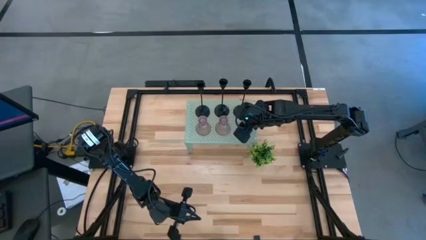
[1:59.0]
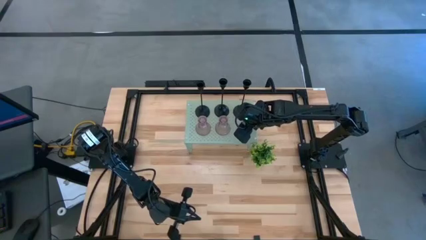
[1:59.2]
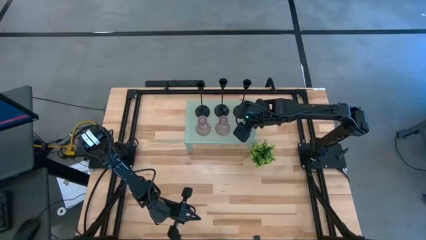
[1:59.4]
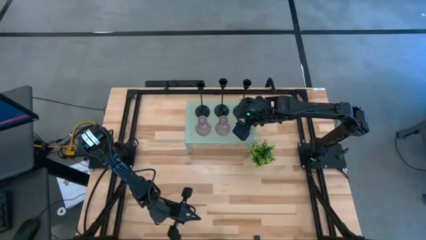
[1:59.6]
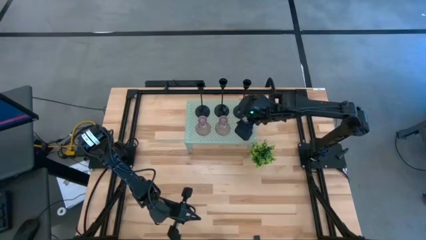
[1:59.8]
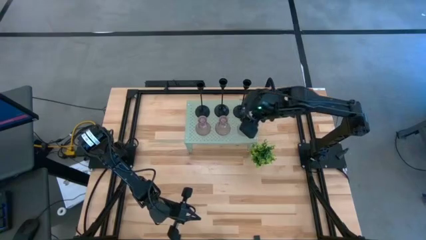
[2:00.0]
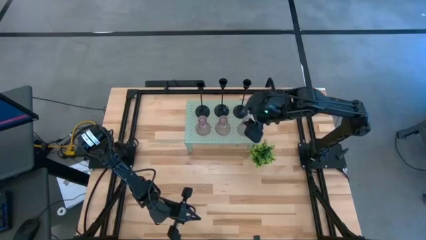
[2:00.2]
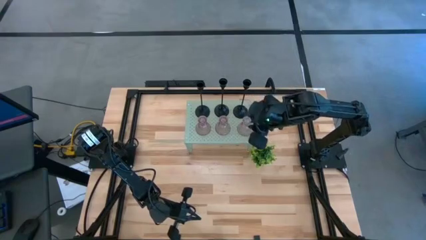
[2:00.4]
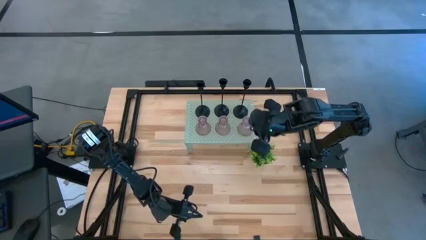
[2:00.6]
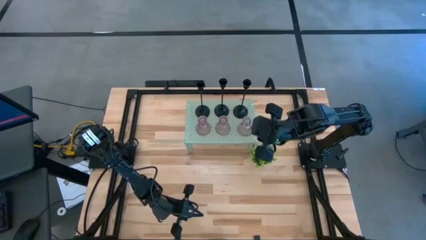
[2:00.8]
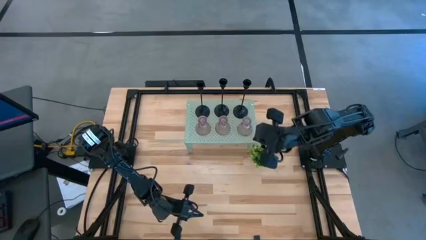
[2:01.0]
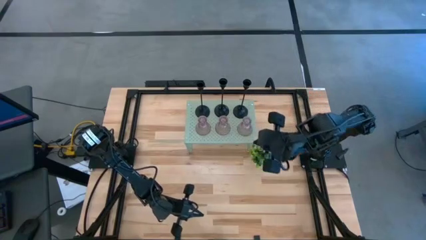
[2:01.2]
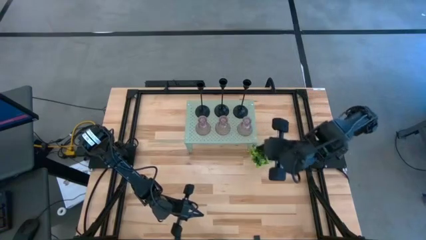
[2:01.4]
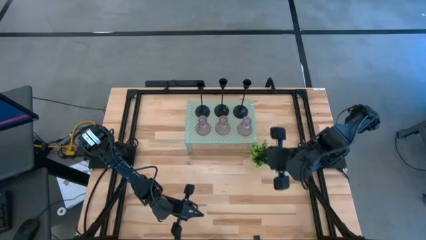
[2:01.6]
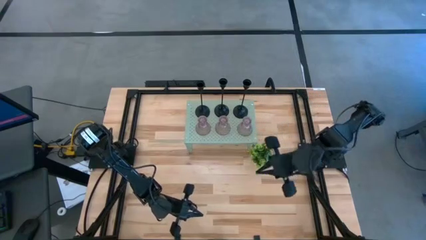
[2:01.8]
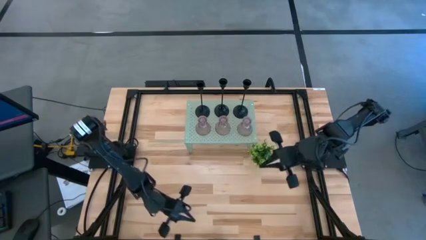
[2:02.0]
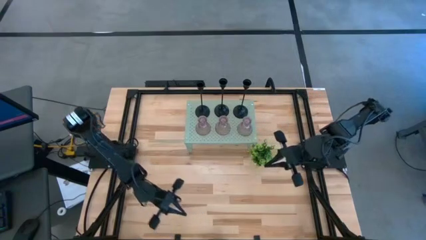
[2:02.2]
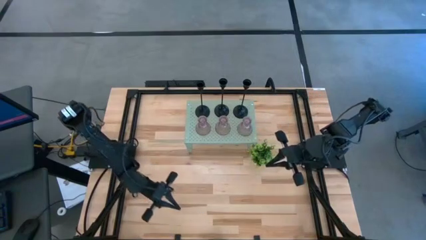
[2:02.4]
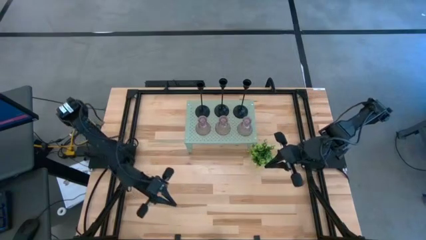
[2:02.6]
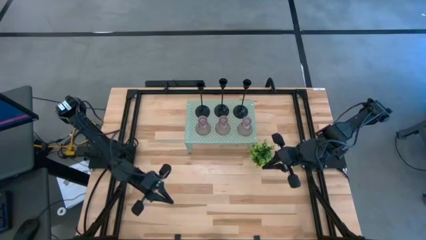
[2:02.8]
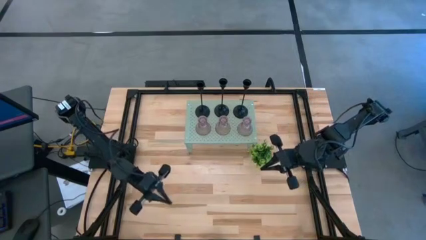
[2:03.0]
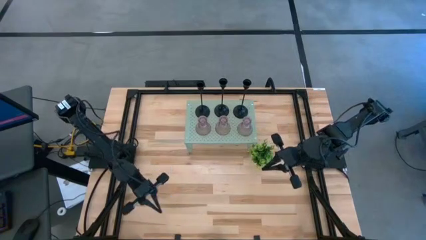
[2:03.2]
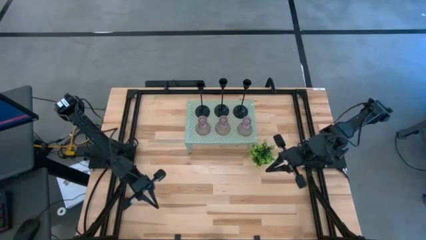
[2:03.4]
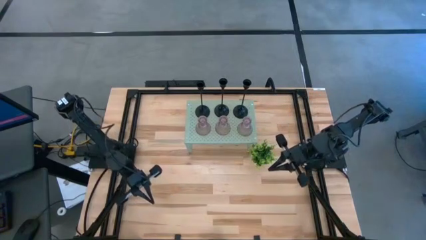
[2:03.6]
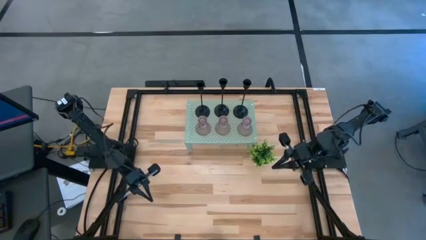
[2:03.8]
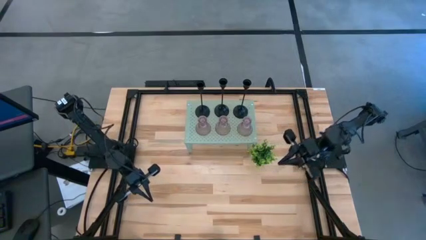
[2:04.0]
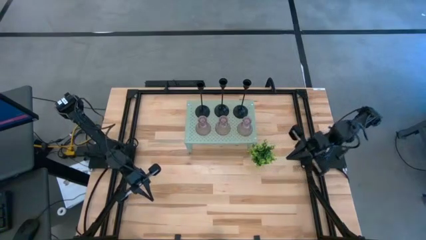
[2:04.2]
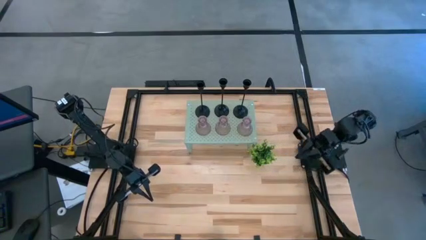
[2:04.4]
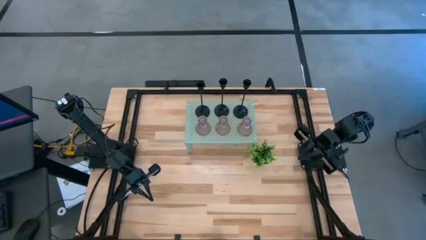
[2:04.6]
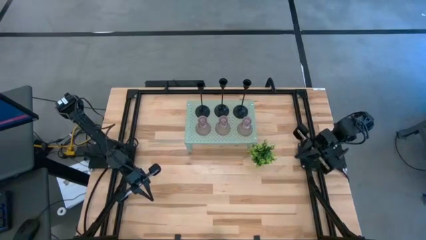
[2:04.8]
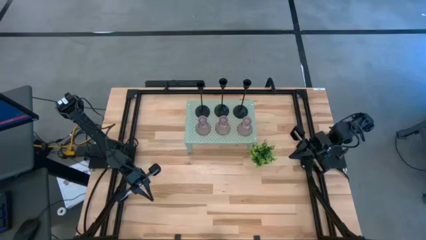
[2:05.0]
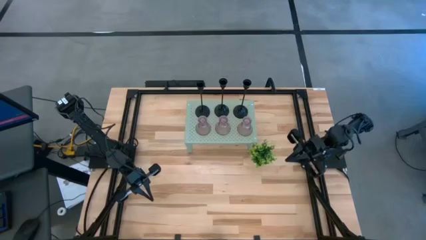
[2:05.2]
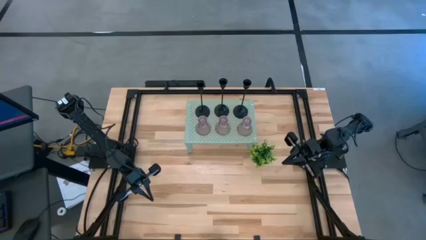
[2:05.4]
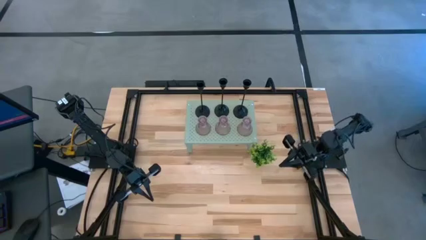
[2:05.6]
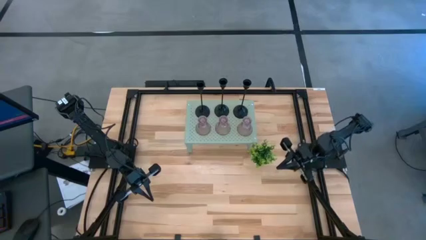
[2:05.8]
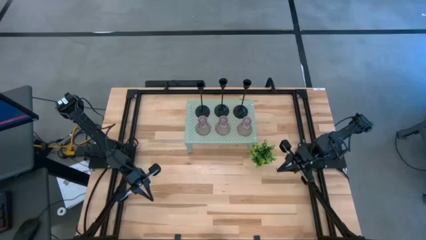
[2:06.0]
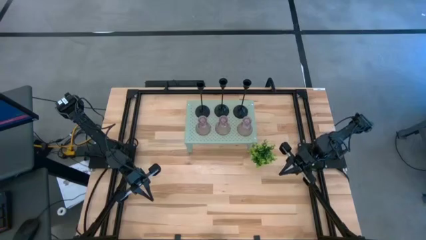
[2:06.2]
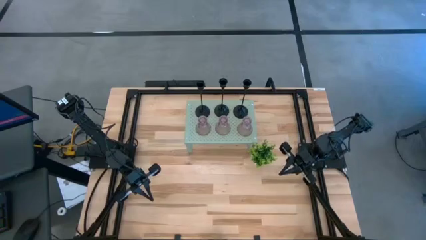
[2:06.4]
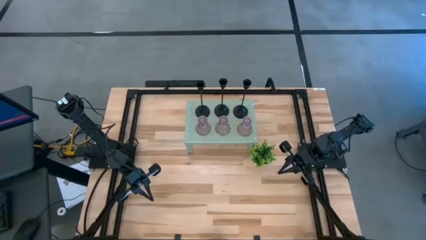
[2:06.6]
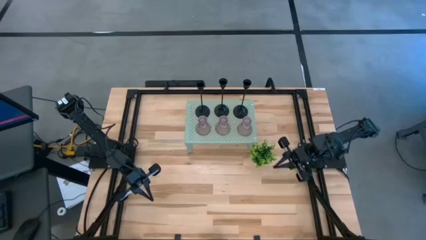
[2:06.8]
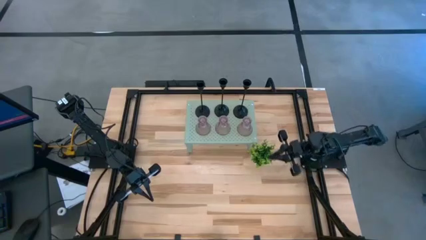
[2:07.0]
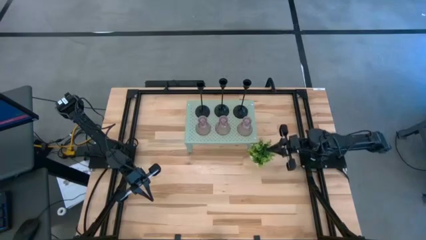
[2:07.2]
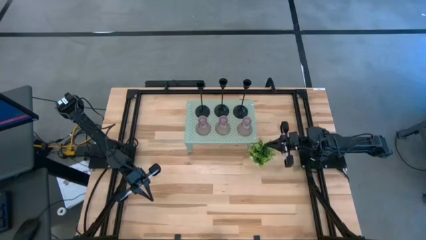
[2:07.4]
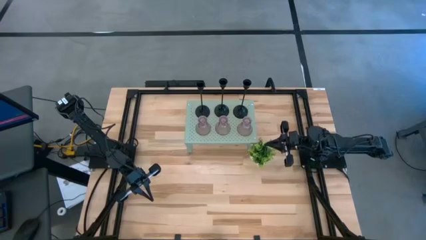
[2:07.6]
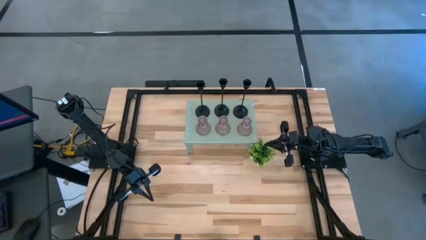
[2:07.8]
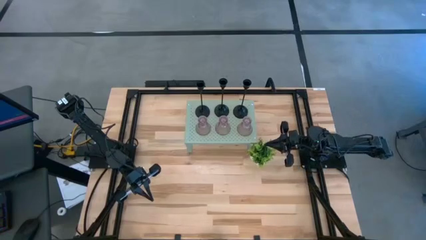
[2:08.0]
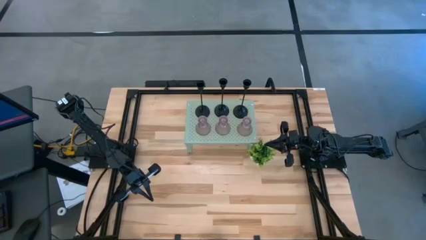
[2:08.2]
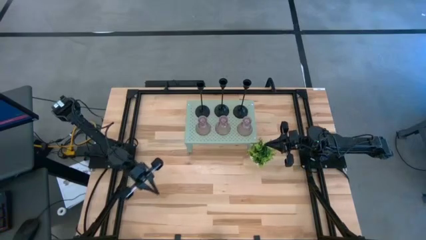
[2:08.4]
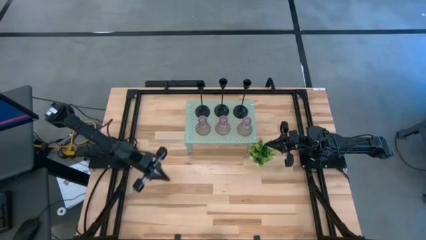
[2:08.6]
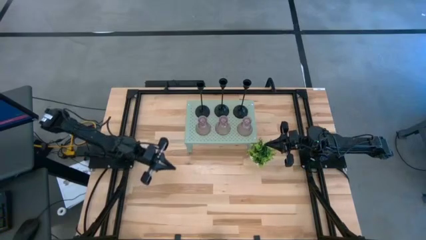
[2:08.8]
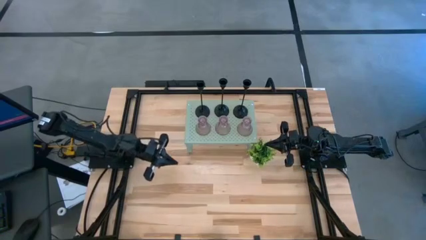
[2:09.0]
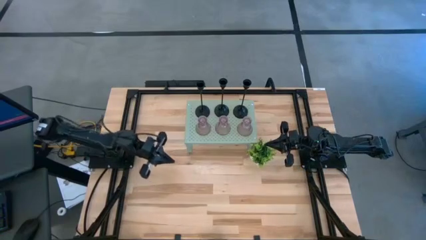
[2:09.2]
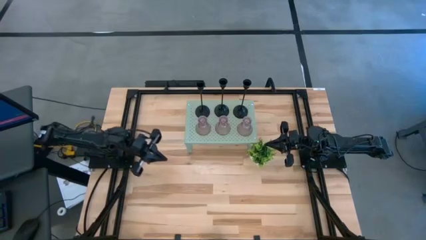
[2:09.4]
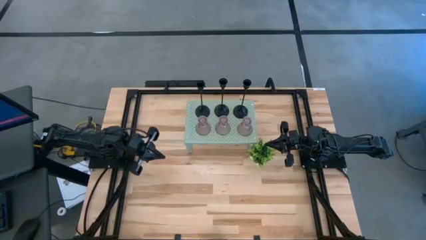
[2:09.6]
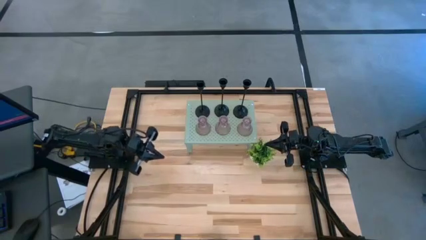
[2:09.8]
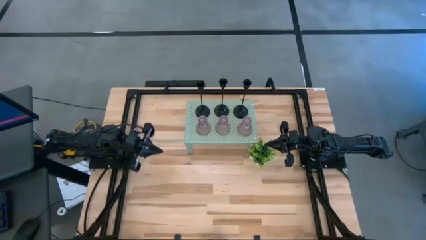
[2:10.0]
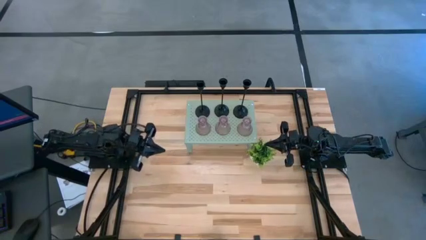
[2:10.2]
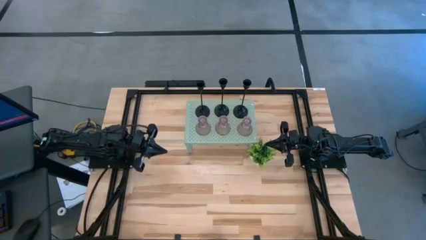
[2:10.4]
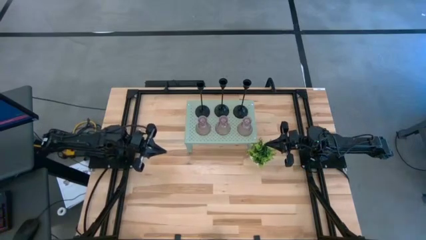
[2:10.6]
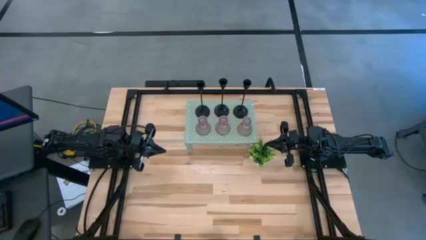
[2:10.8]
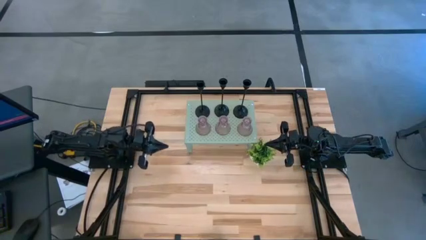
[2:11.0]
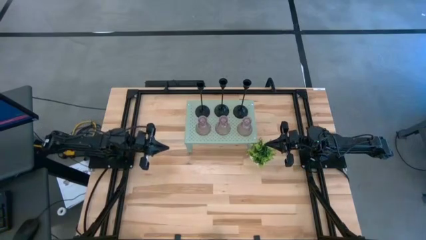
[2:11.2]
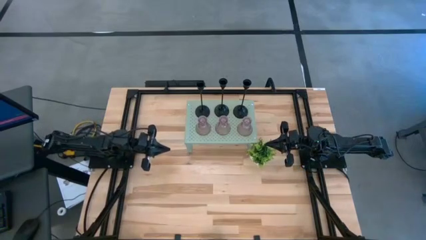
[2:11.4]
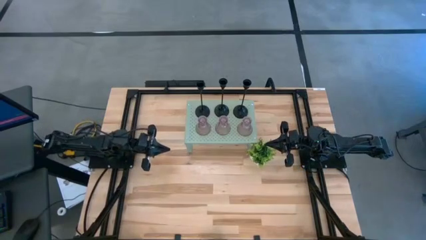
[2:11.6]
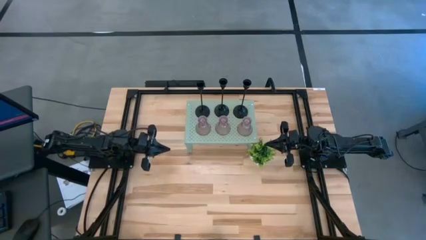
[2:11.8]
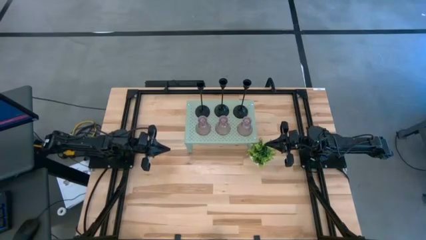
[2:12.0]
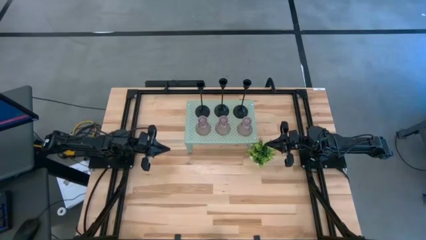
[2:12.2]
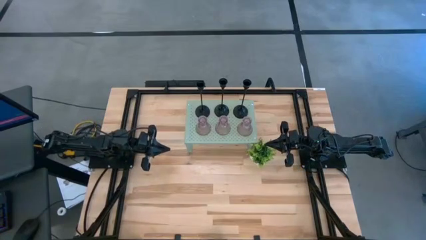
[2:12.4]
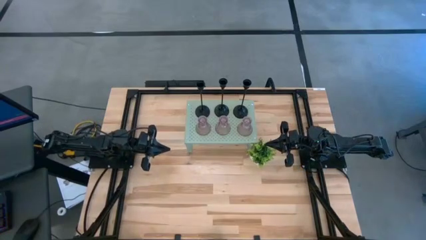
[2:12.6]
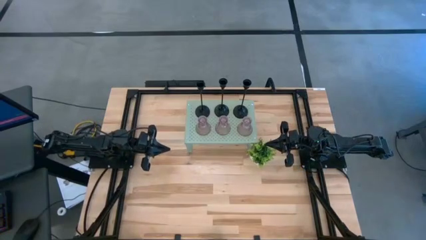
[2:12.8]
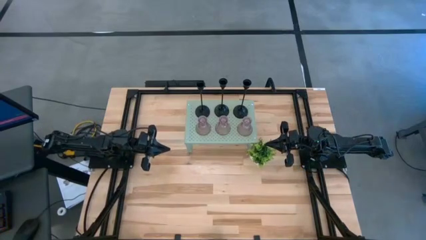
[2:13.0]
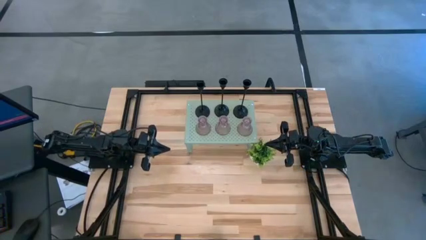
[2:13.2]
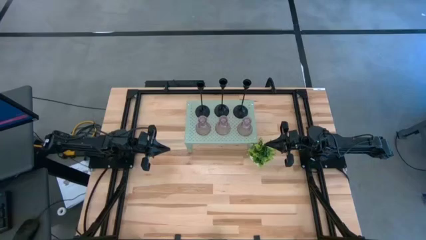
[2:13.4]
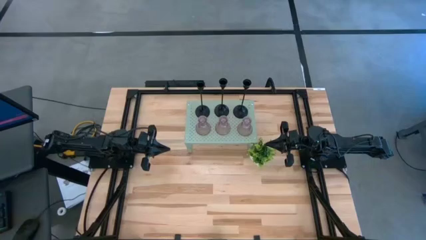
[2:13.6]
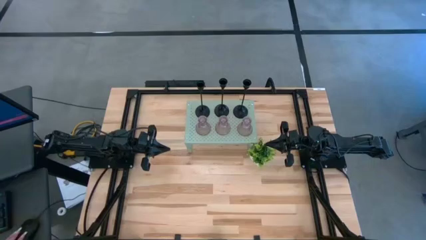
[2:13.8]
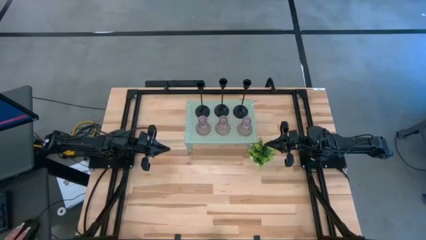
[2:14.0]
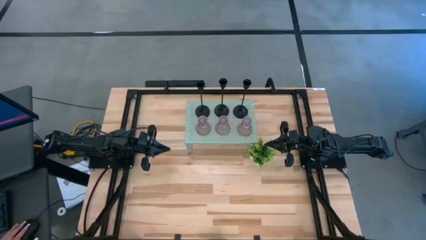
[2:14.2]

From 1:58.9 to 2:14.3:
Task: Pick & Place candle stick holders
Return to Home Position
